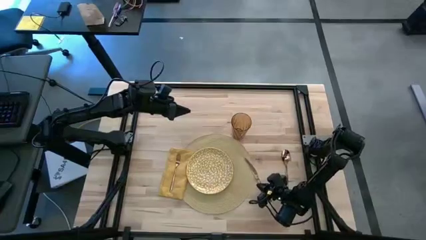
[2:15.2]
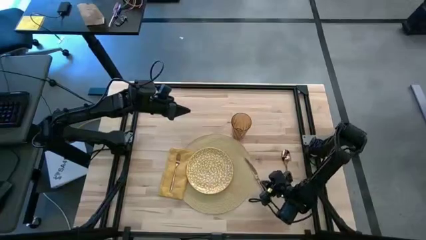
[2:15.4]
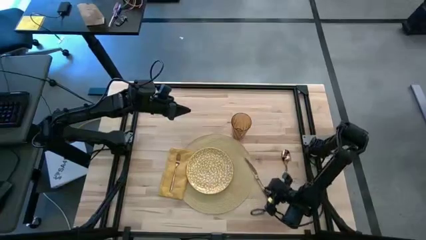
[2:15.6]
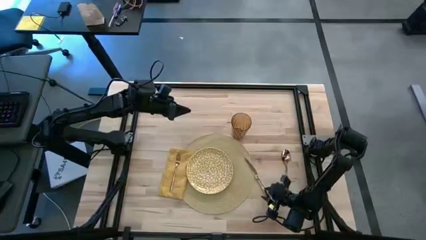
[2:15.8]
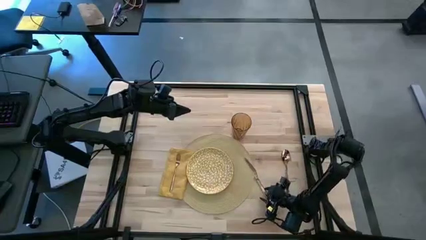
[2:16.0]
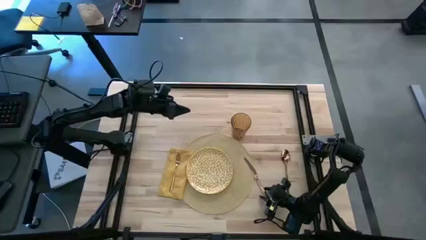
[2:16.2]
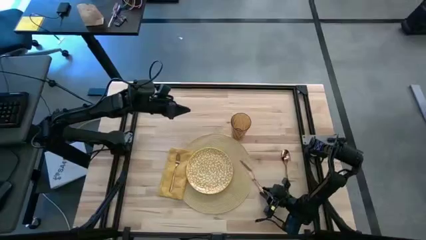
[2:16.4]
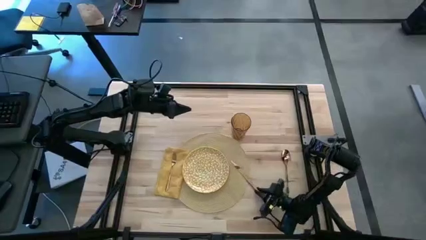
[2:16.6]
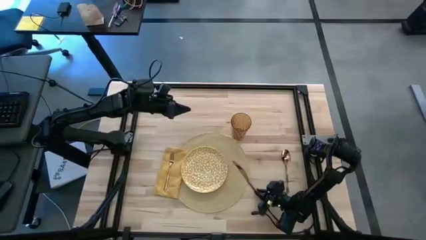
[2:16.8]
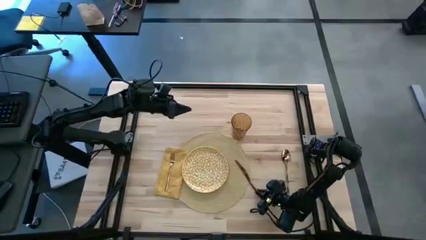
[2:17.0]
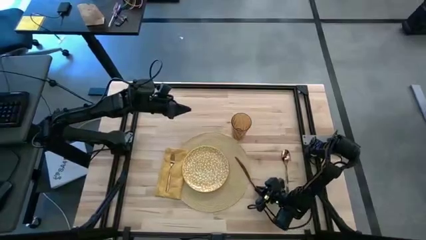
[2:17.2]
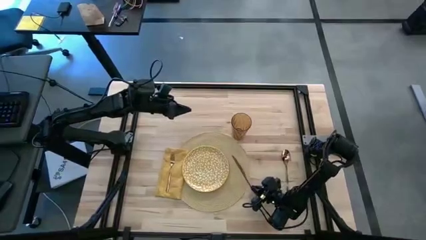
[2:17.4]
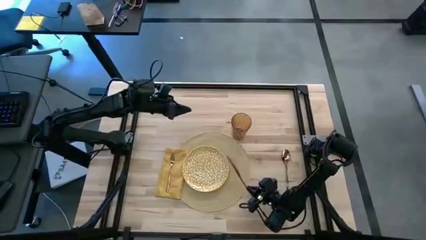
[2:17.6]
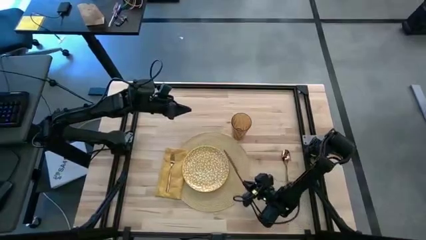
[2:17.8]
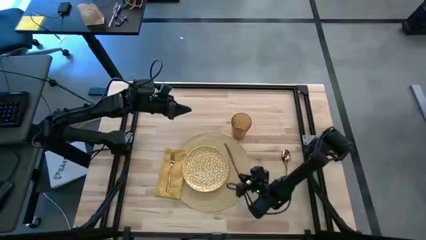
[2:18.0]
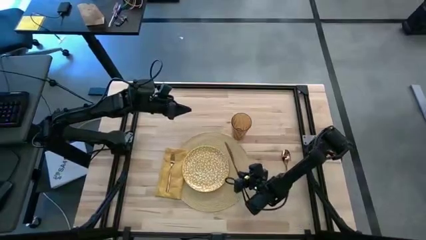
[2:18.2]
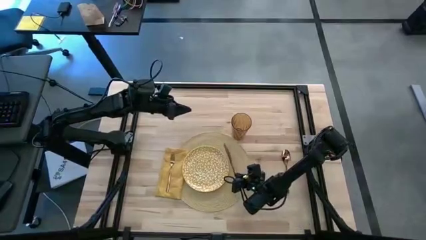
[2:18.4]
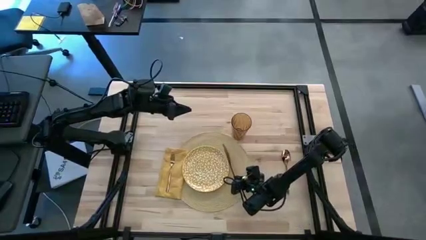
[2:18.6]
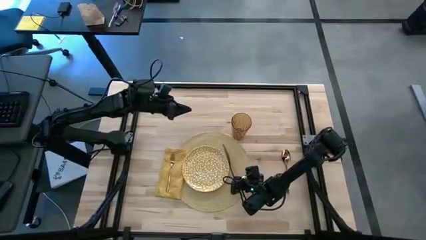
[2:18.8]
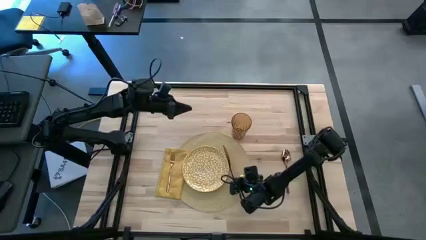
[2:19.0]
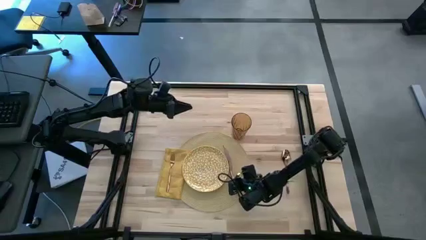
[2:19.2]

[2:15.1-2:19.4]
Task: Set table place
Put the bronze knife on the brown placemat to the right of the yellow plate

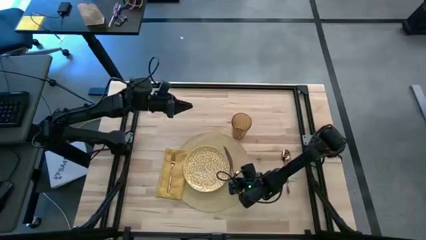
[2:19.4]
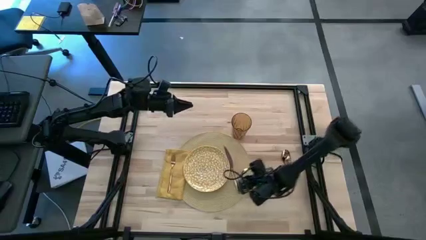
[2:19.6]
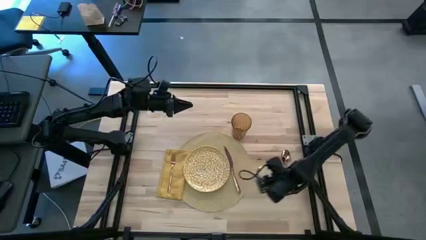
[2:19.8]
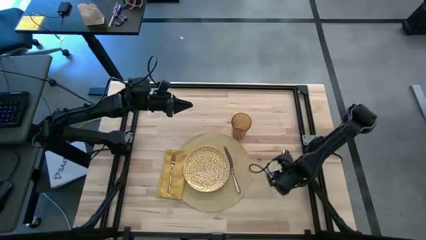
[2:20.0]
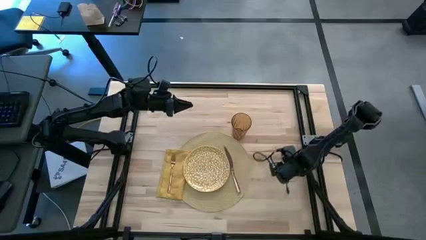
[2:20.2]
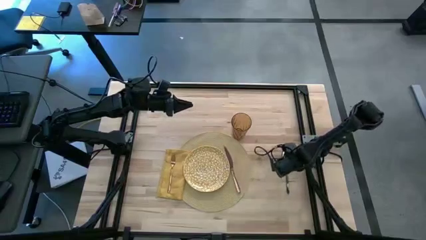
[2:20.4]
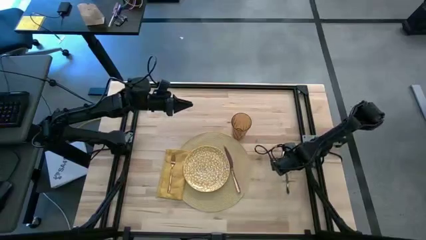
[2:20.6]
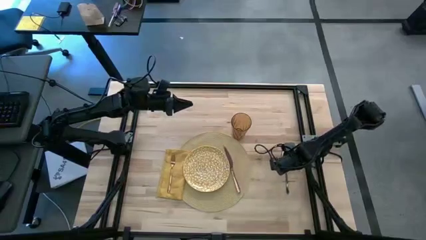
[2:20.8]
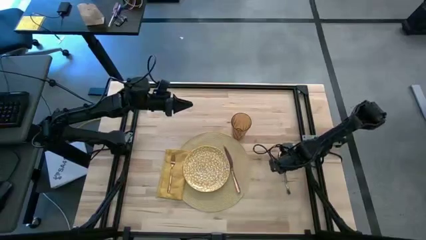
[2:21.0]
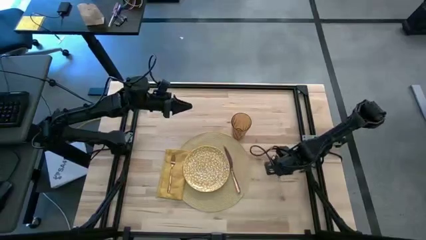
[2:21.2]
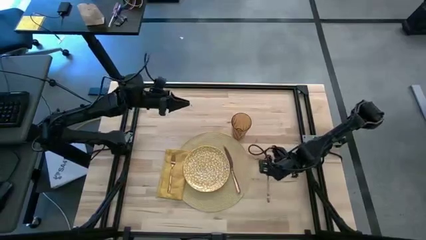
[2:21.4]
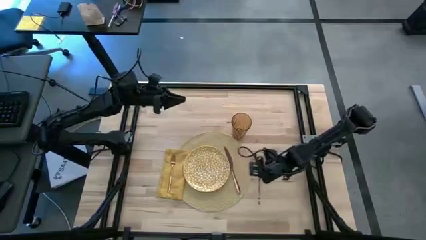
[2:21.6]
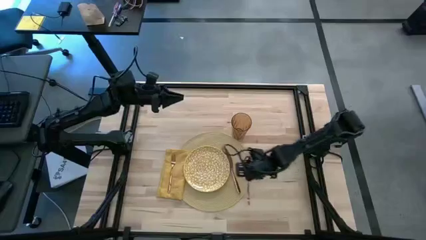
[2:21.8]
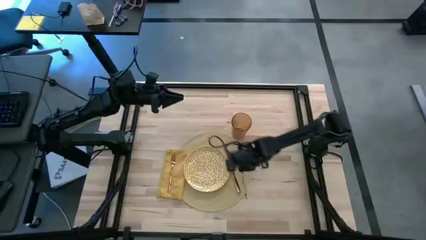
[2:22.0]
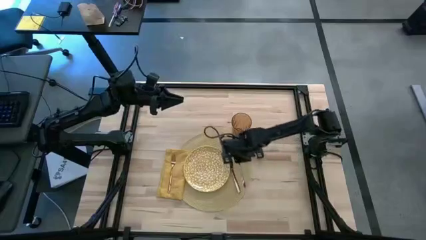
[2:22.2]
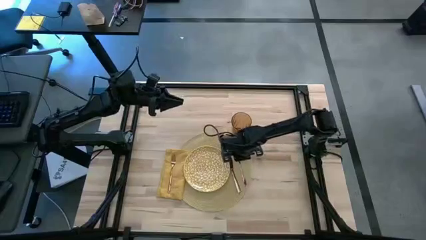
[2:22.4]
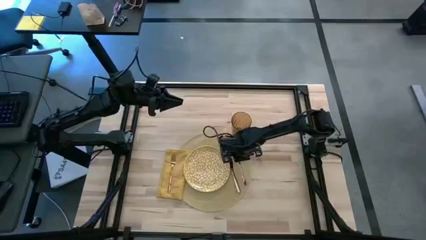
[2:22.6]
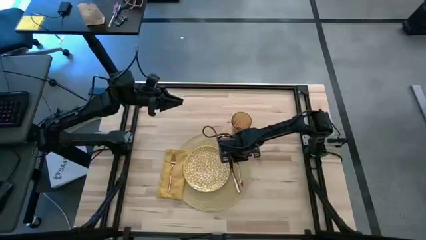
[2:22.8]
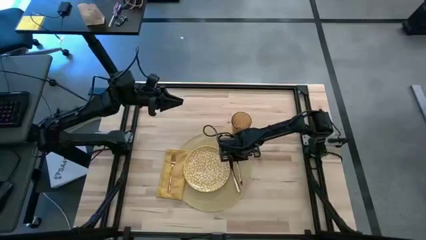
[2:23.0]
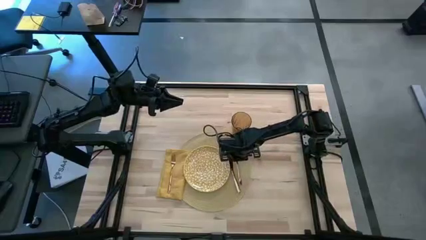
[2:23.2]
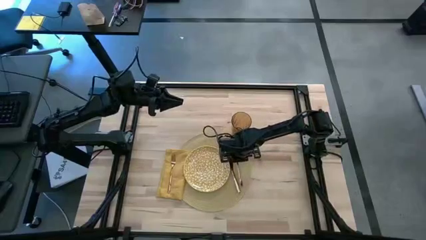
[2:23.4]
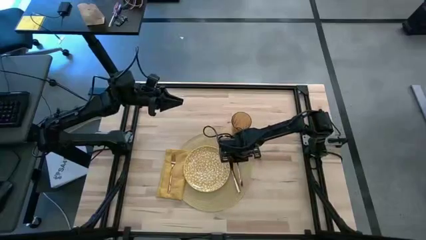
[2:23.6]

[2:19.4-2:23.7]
Put the bronze spoon on the brown placemat to the right of the bronze knife

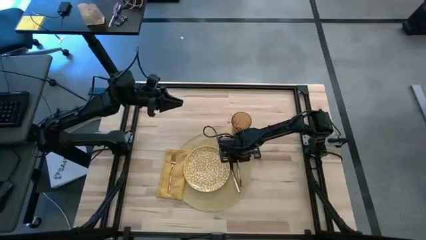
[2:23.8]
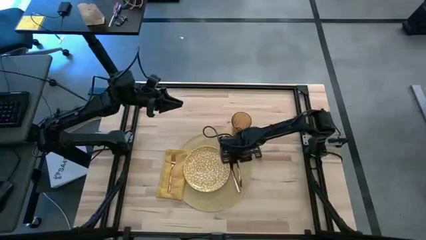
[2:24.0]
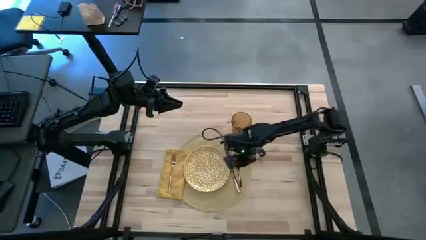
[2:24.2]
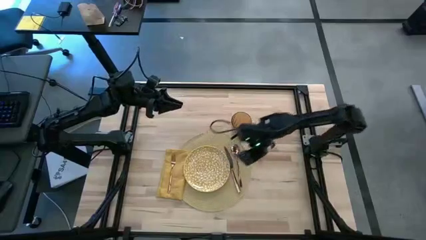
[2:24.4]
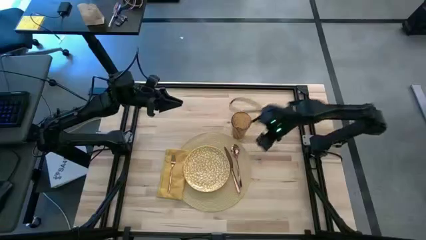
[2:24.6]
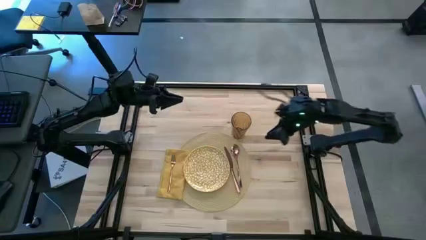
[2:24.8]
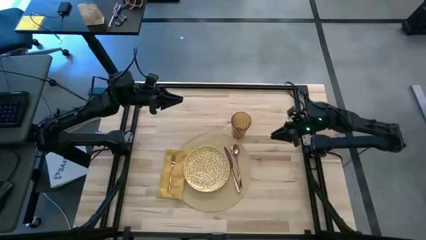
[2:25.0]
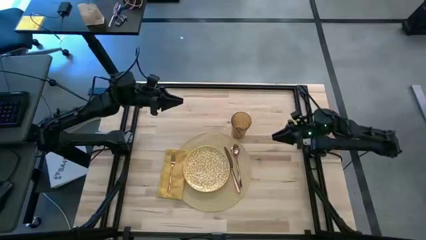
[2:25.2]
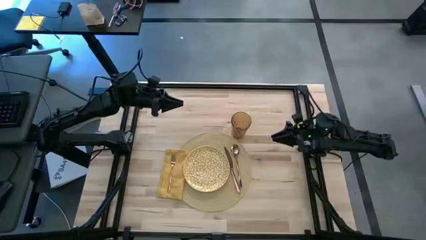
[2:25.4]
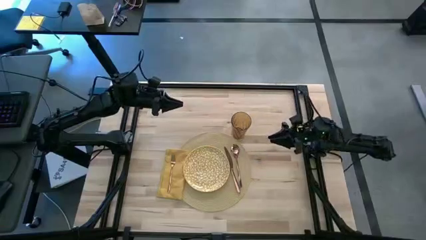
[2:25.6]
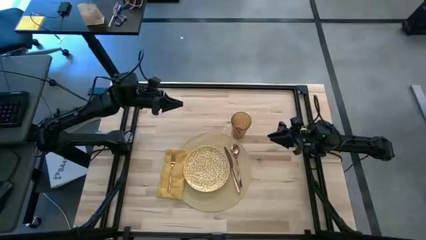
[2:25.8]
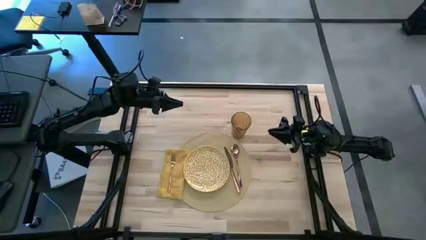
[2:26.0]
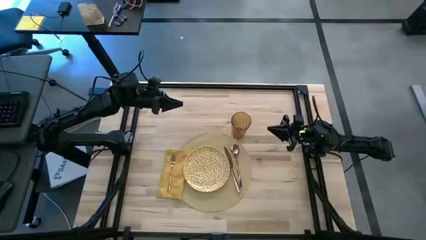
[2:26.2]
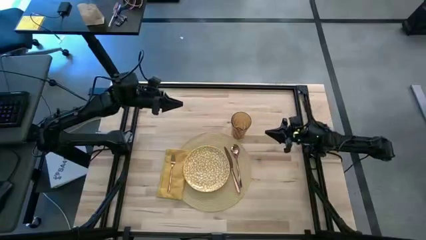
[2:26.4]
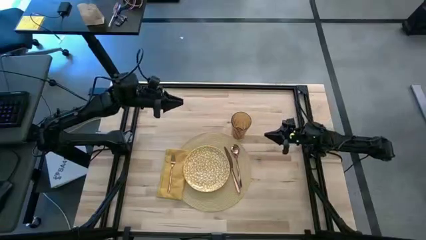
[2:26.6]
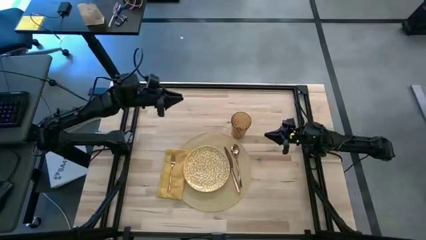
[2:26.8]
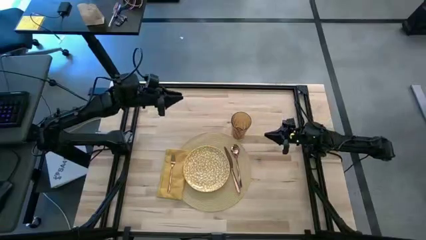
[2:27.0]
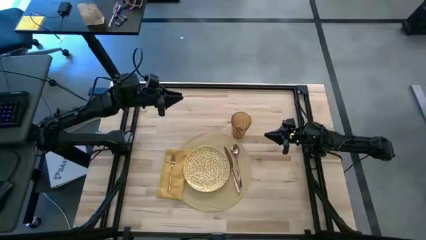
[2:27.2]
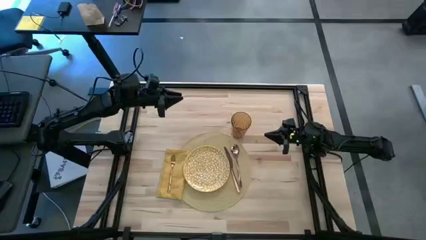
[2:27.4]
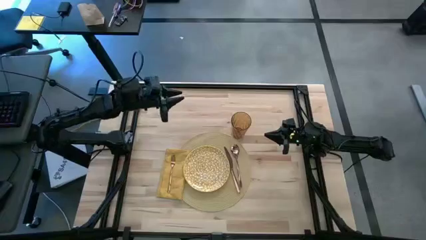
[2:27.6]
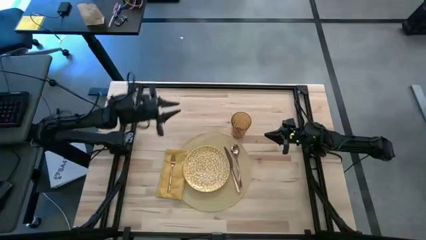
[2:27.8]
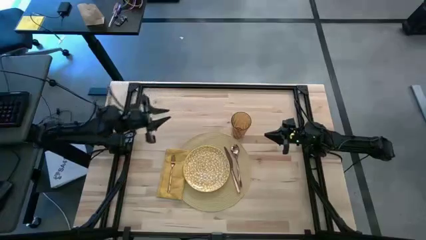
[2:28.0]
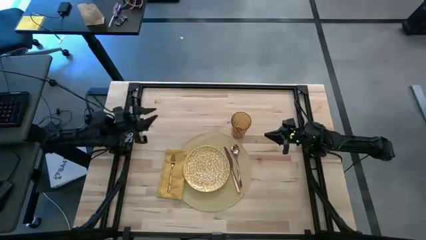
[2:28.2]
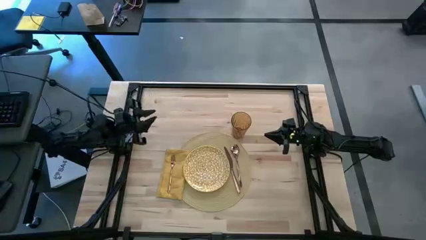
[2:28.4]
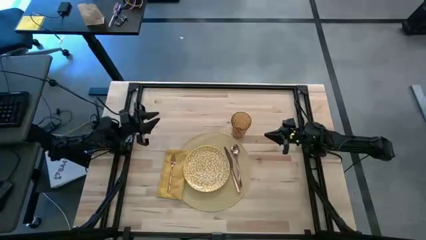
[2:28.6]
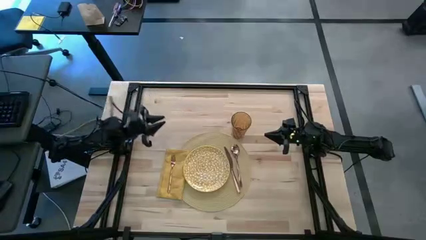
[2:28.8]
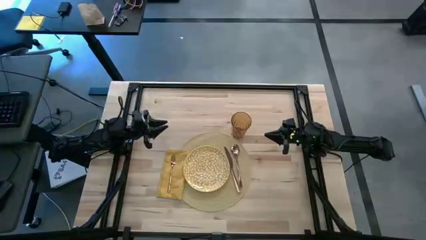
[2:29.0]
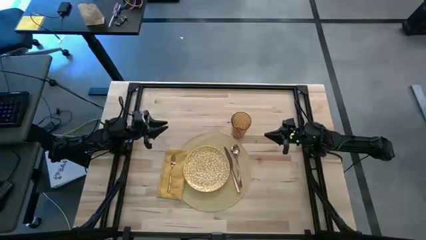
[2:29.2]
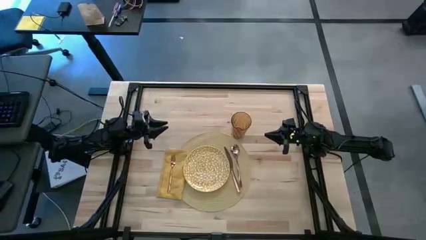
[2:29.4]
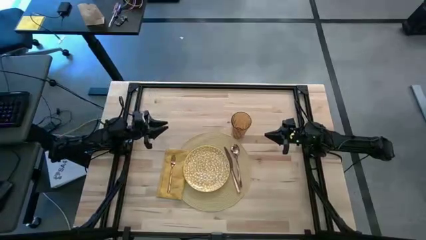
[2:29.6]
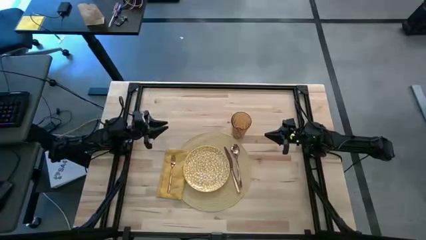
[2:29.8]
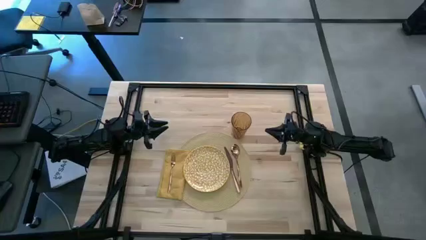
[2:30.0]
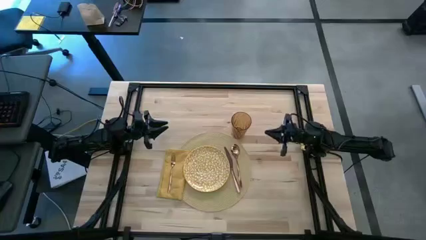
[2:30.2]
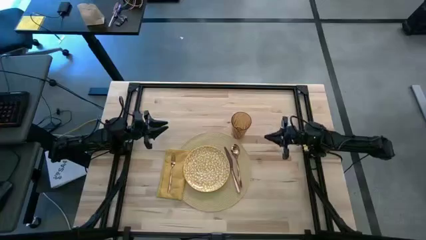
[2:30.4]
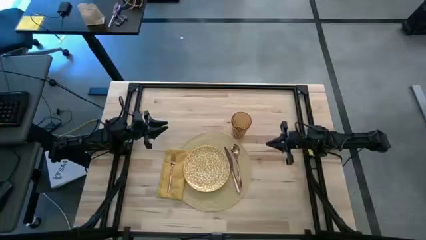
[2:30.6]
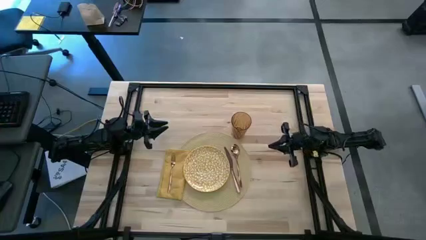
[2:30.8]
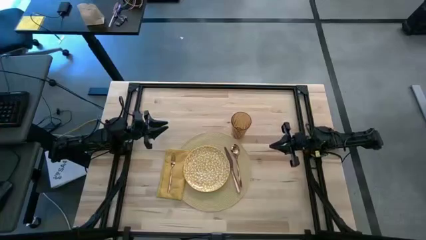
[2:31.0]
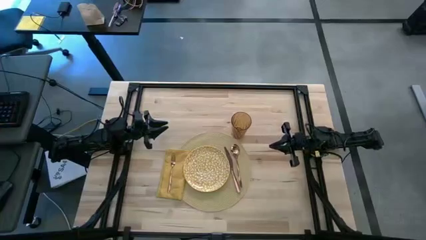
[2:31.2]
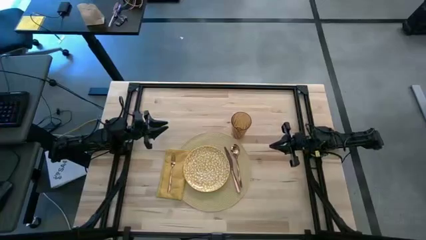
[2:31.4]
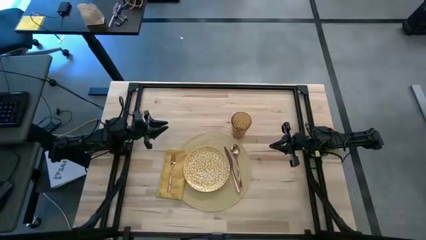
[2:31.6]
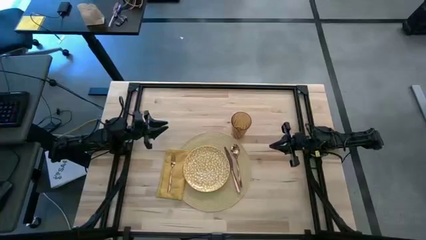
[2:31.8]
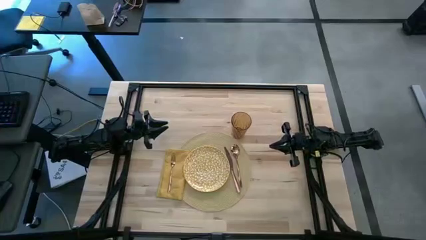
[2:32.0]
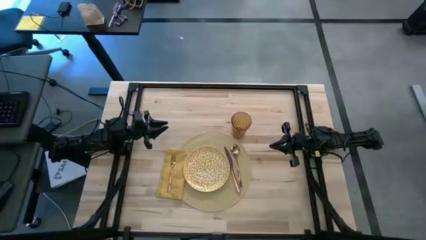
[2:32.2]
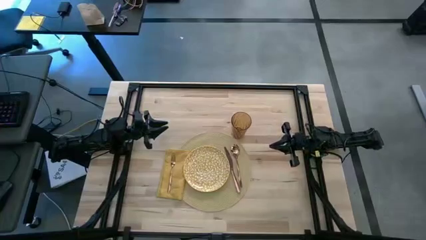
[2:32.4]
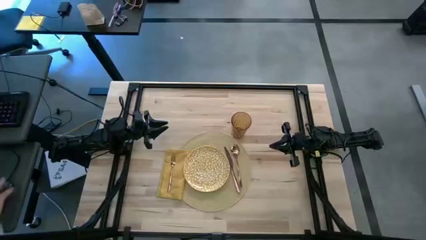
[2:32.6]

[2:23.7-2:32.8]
Return to Home Position
